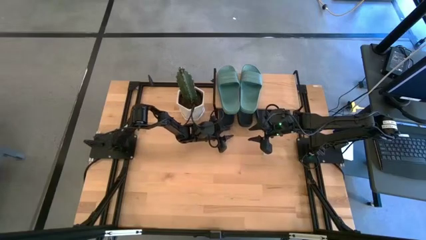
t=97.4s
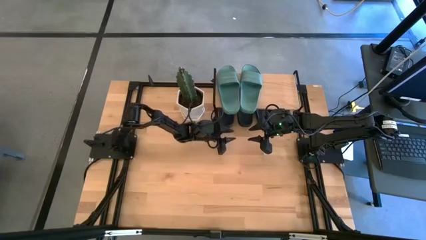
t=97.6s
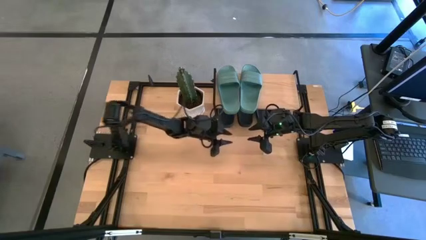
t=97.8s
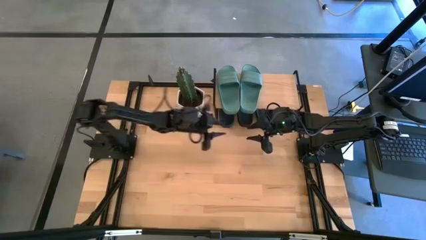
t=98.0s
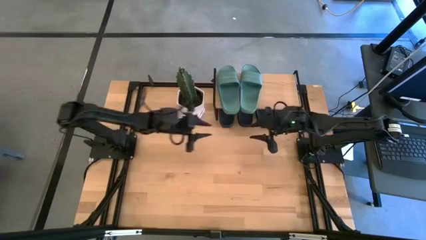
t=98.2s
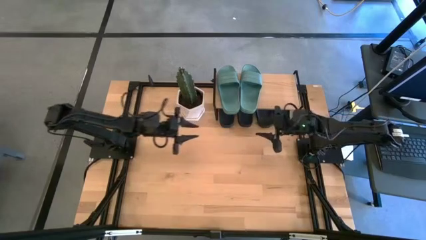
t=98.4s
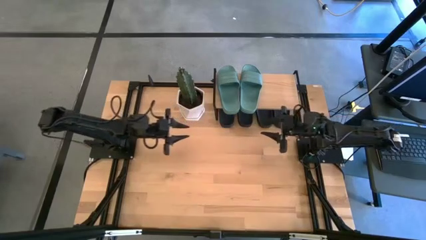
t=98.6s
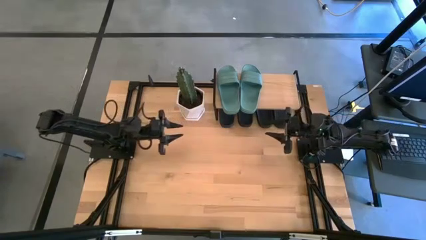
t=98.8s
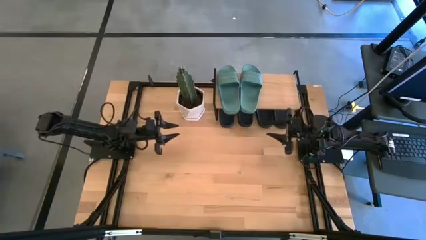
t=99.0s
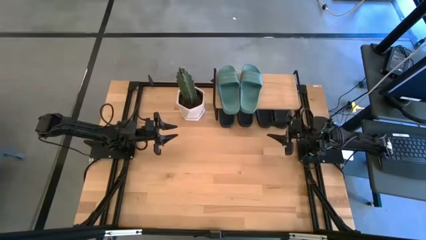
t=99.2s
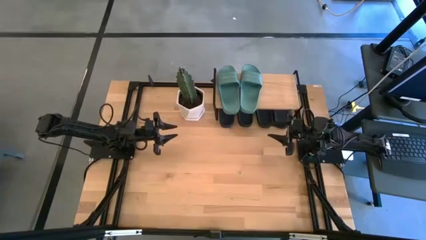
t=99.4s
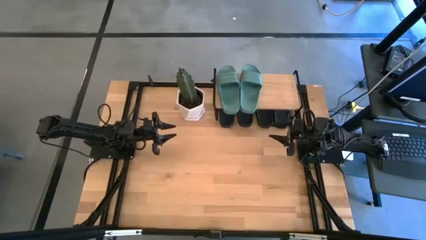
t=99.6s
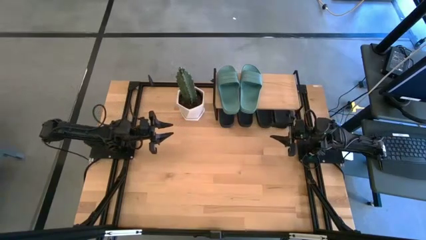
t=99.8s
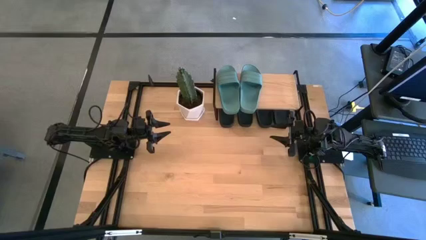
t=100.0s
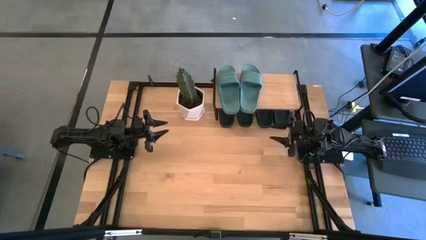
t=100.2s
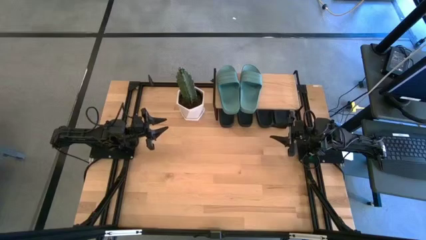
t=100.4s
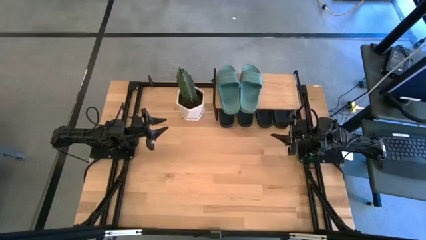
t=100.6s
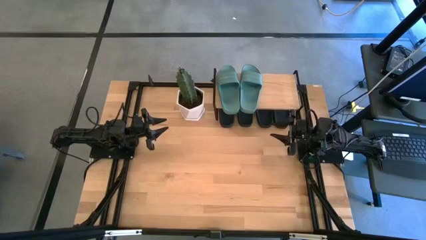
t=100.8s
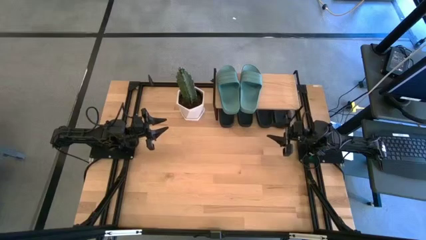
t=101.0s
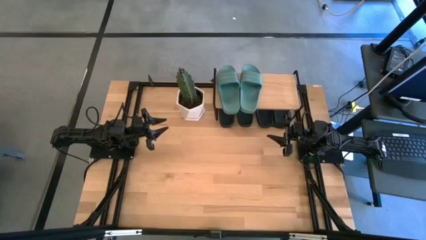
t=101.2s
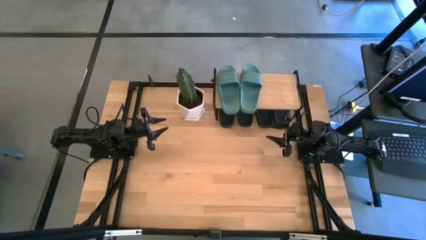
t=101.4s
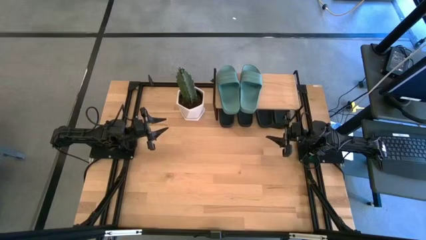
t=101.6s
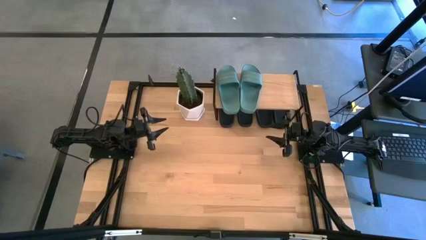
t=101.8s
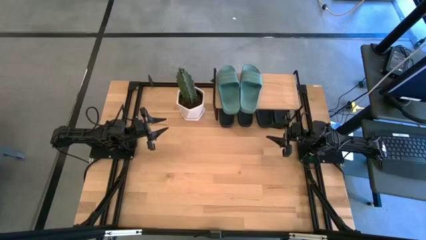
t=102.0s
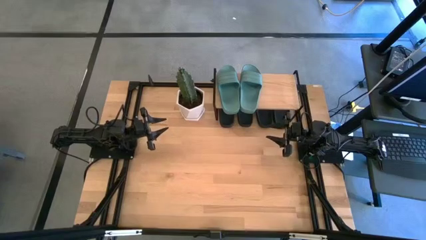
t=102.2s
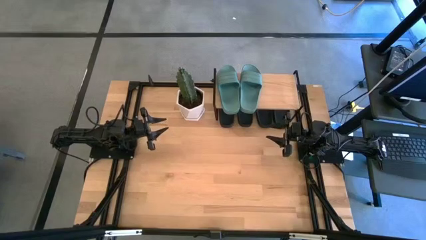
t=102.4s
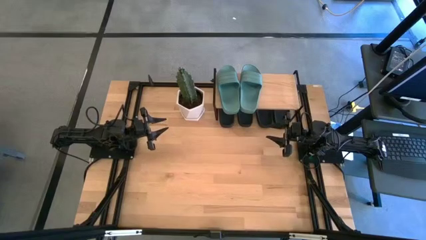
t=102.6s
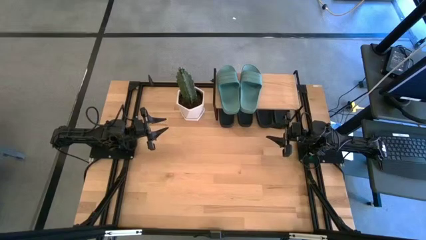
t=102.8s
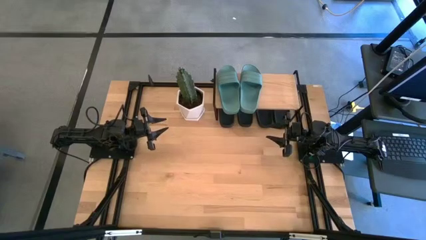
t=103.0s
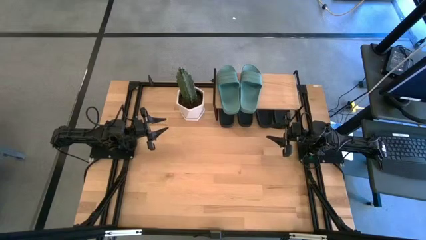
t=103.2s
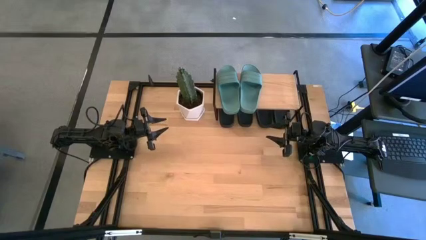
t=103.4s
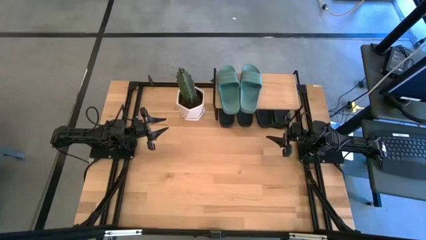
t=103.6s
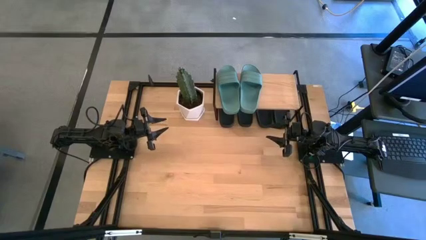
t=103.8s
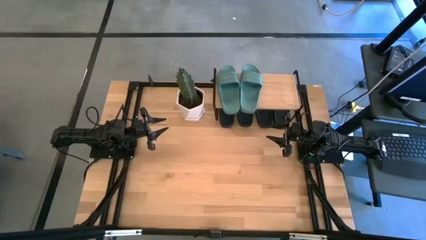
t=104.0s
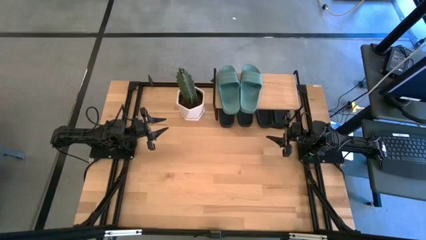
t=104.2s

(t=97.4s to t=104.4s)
Task: Pick and place slides into the shelf
Return to Home Position

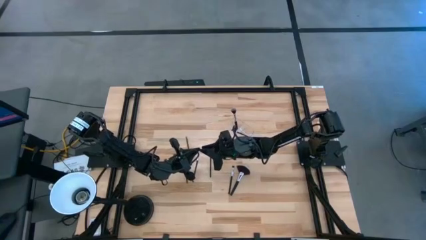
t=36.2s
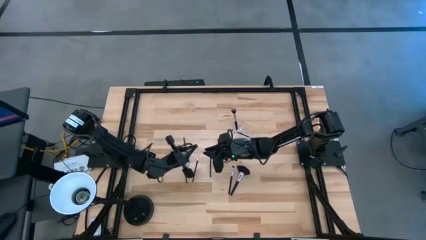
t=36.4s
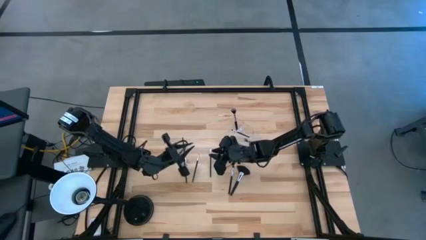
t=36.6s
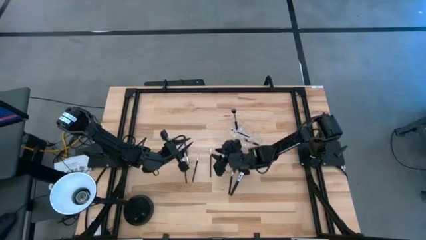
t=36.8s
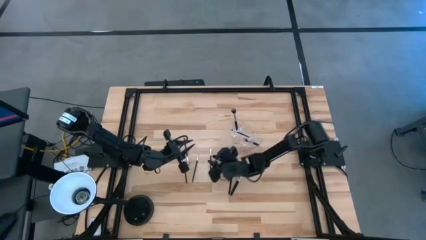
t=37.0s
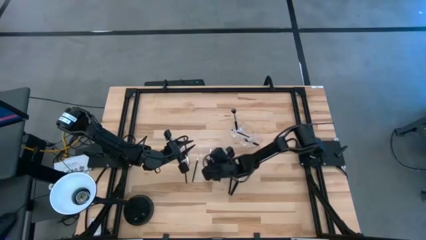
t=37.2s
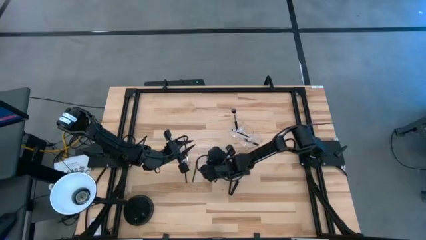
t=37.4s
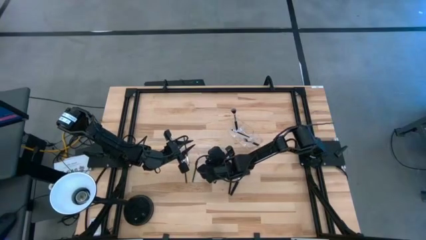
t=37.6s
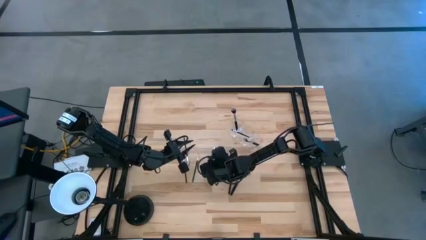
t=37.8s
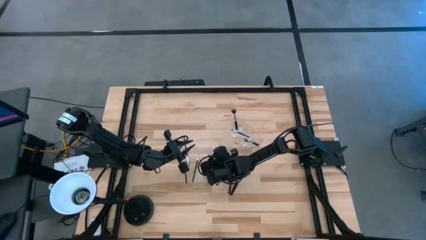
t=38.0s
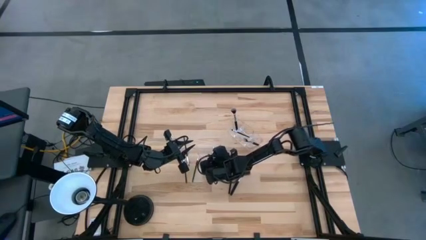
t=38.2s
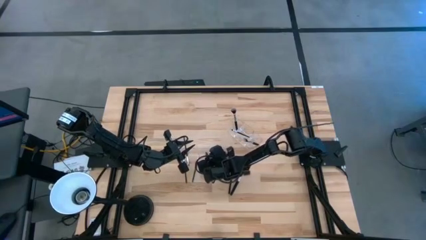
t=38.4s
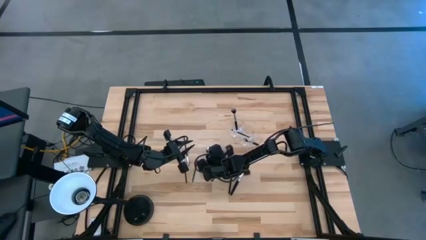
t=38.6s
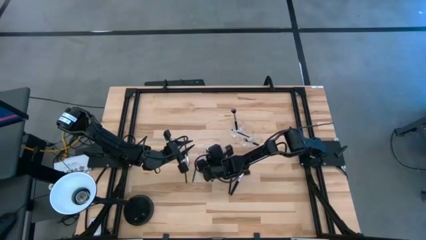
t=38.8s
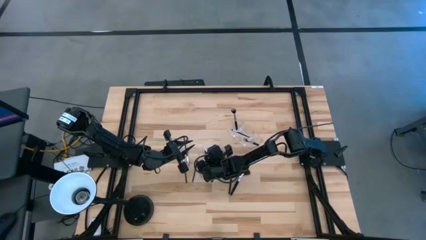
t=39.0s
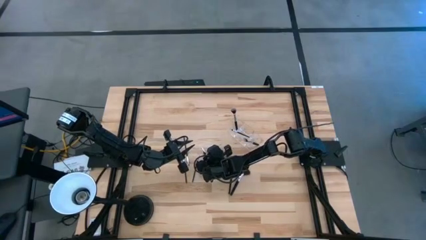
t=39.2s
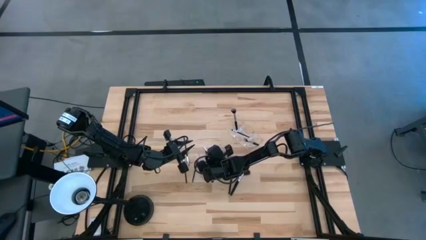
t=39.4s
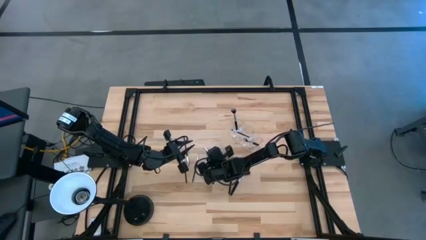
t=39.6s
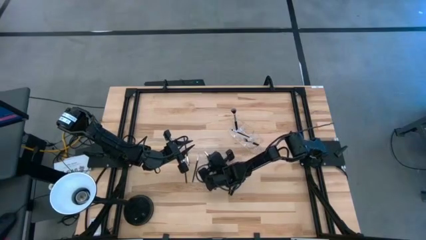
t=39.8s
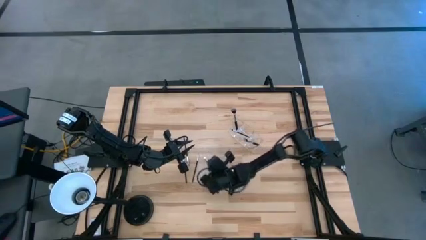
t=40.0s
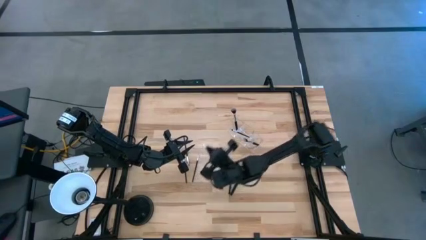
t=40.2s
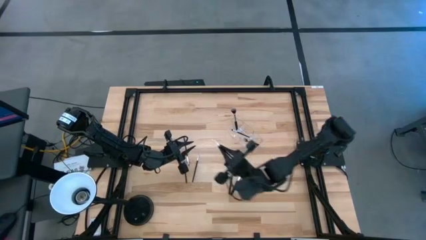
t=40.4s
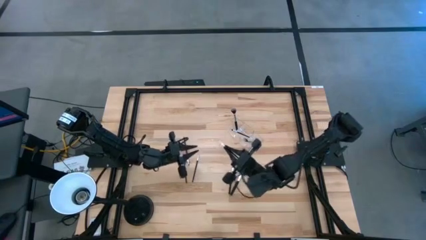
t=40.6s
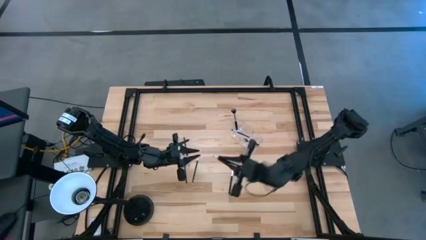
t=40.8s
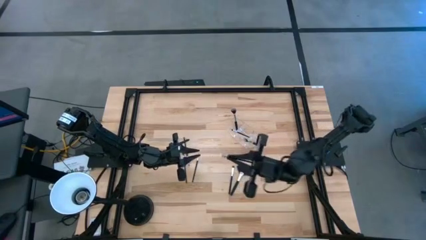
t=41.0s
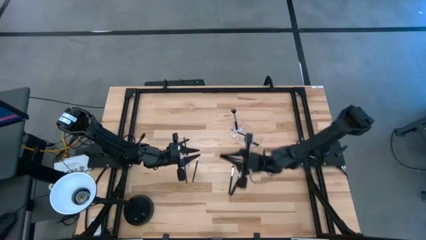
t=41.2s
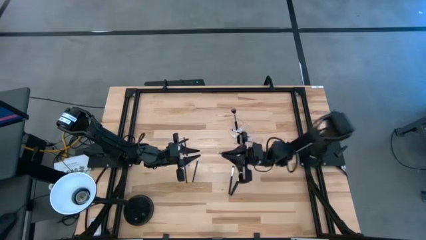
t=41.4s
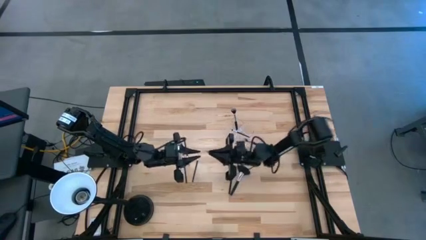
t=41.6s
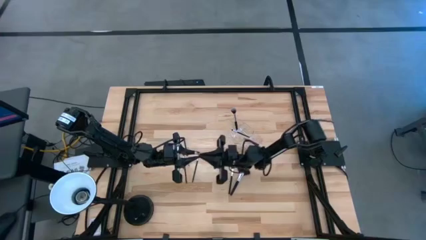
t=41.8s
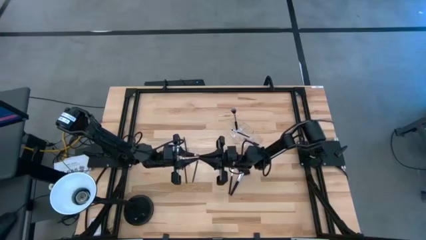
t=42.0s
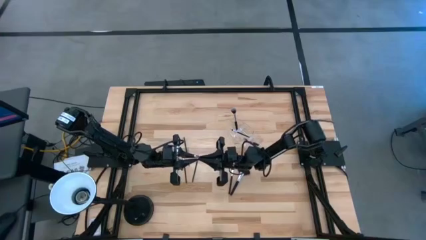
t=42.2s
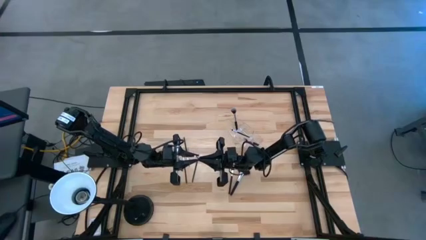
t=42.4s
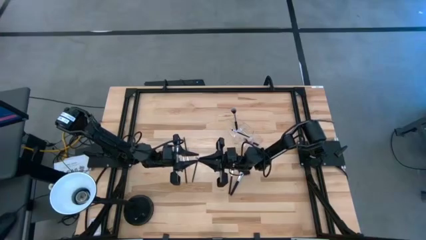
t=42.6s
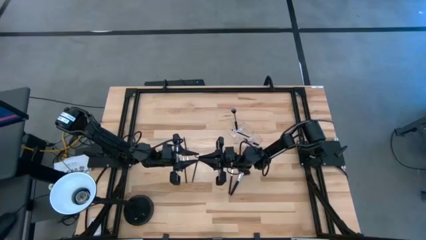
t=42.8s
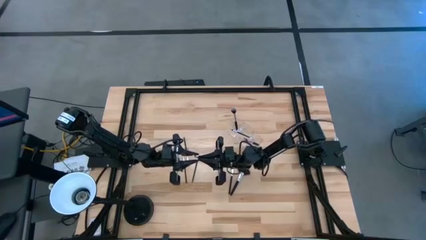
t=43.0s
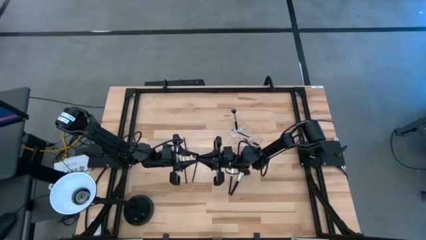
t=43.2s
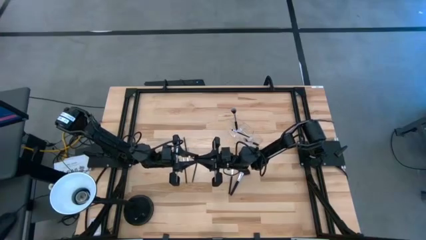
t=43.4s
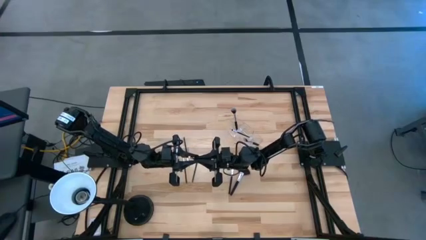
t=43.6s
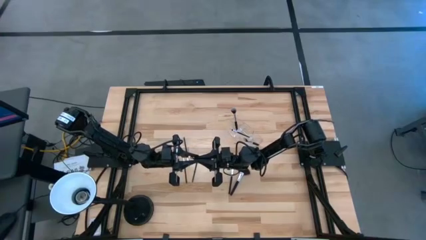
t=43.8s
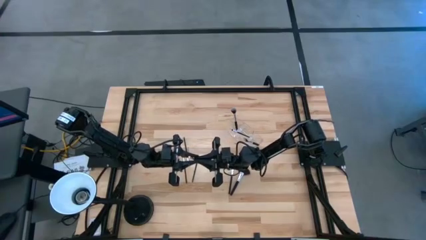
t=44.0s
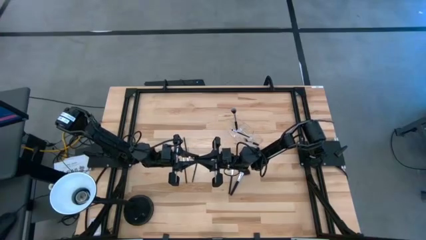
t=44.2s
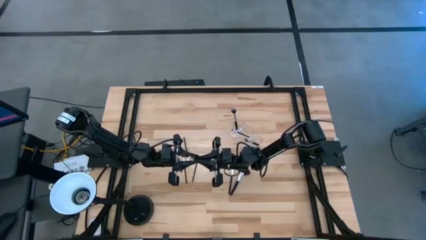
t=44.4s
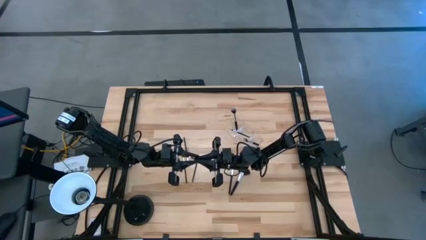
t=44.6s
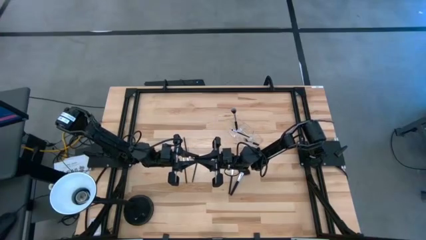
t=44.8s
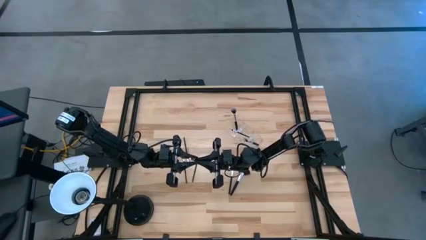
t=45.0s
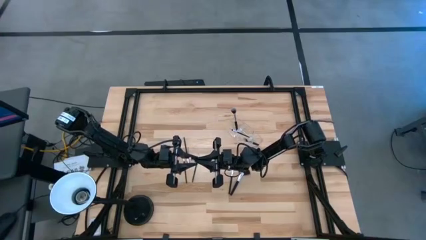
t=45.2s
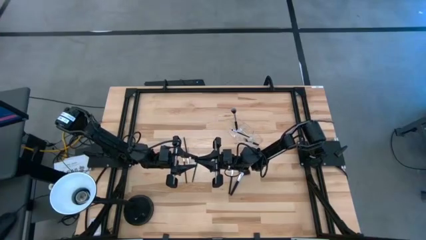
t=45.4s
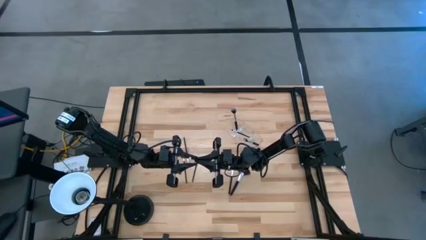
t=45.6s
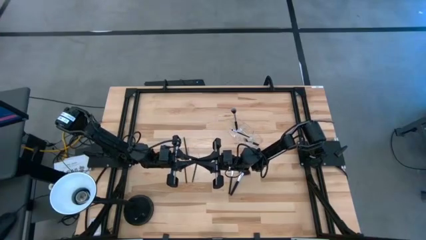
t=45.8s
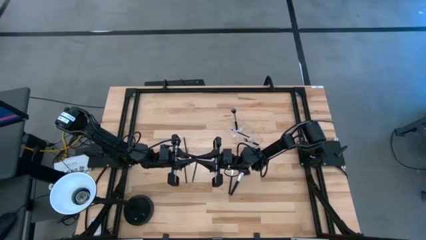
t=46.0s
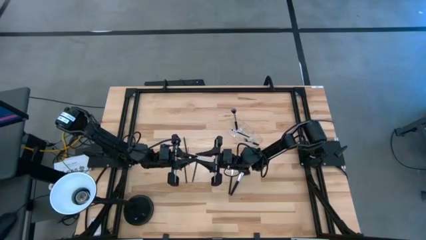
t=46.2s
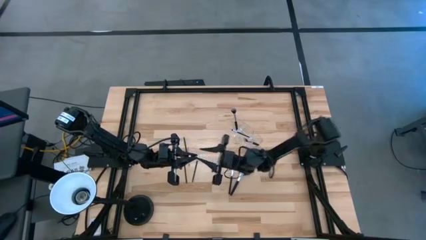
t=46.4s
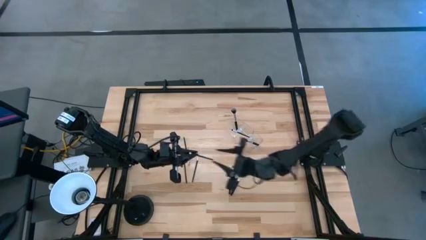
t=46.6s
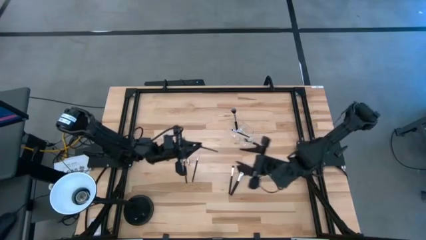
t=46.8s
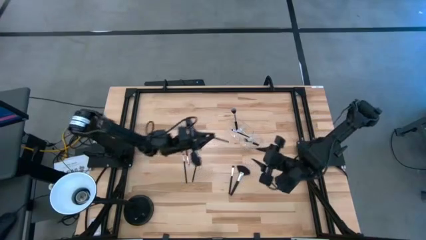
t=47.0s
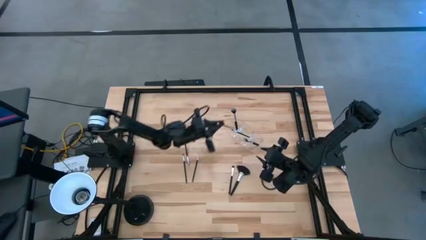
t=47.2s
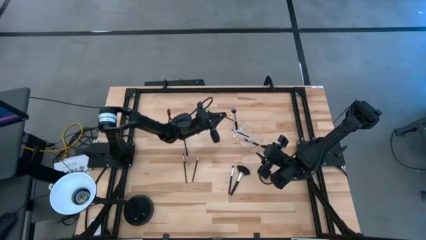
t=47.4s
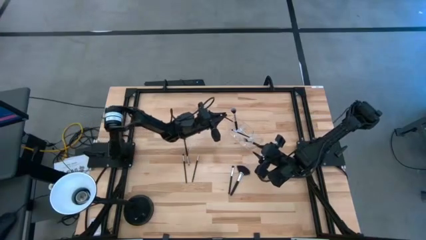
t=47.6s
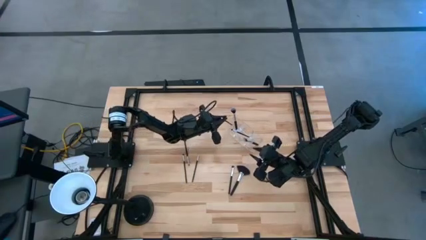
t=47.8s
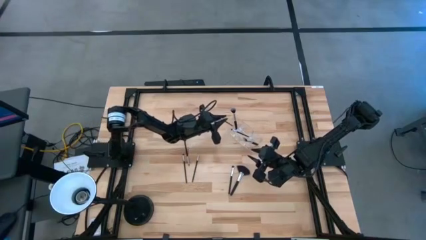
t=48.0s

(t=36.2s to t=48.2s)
Task: Put items in baskets/containers
Put the eyeshadow brush into the transparent organizer
